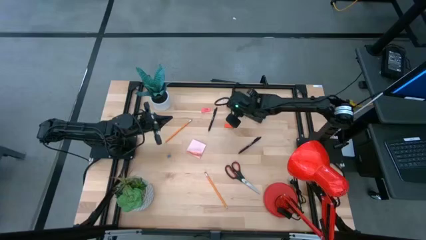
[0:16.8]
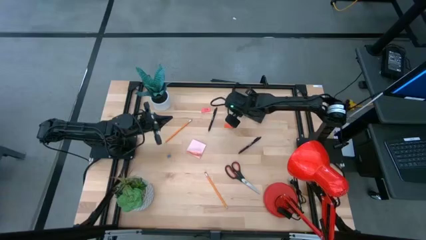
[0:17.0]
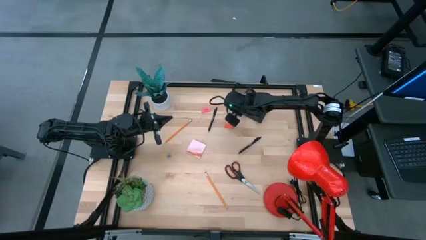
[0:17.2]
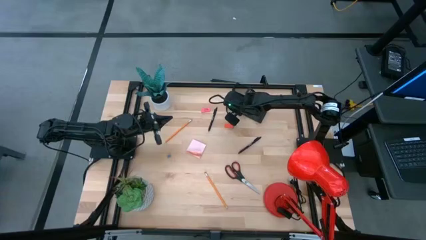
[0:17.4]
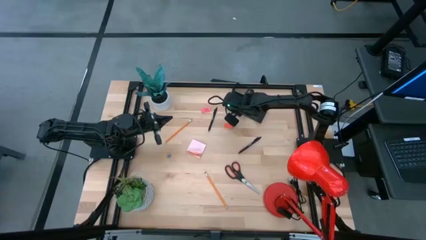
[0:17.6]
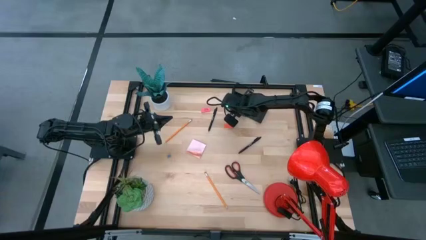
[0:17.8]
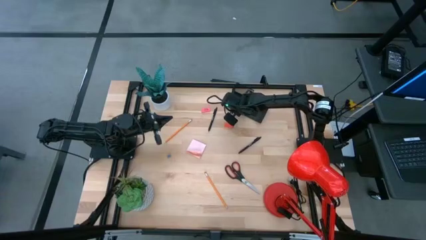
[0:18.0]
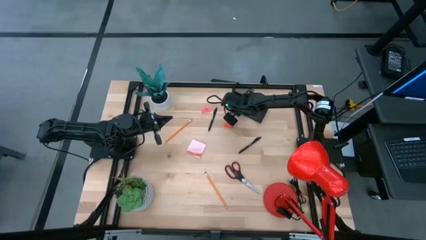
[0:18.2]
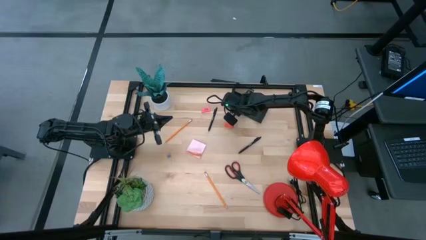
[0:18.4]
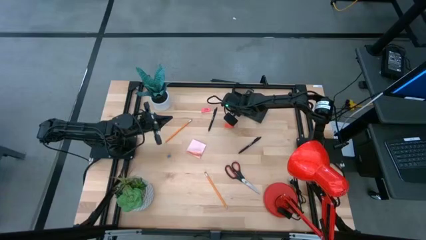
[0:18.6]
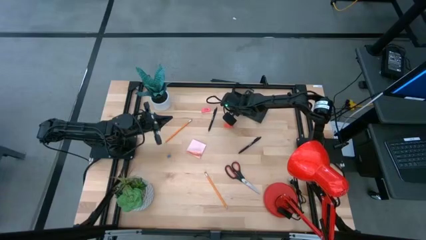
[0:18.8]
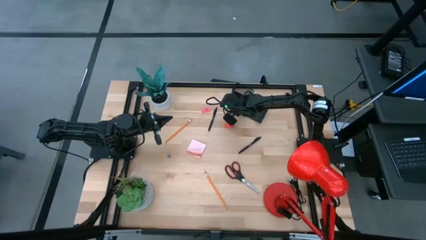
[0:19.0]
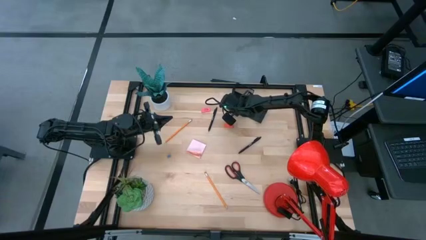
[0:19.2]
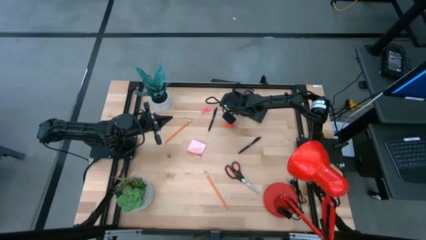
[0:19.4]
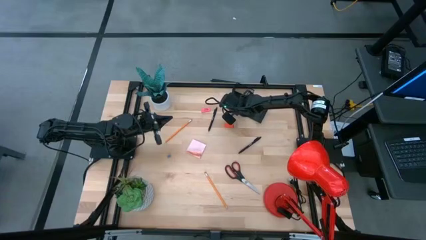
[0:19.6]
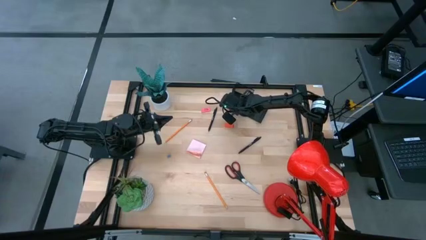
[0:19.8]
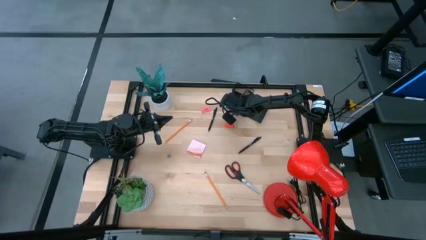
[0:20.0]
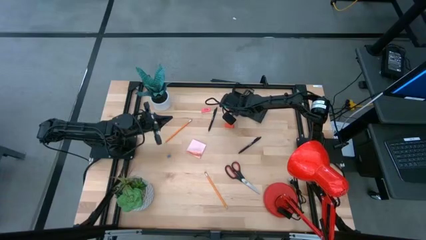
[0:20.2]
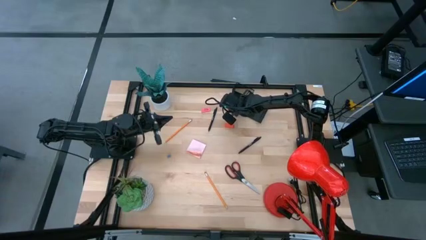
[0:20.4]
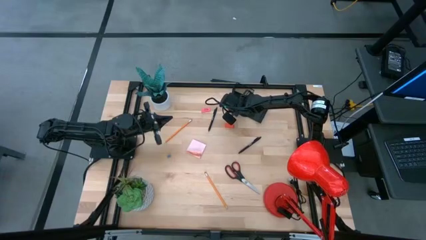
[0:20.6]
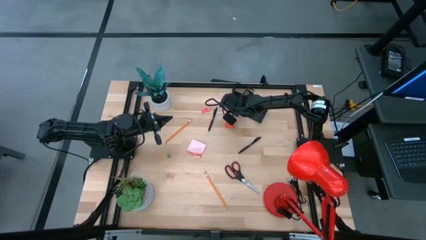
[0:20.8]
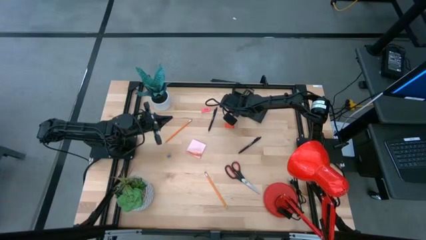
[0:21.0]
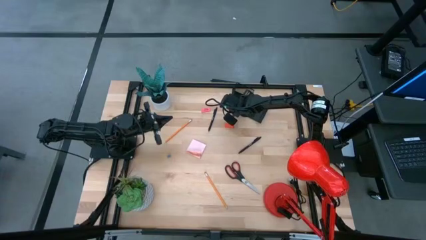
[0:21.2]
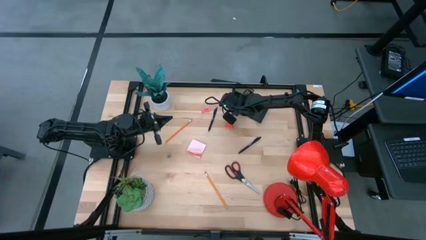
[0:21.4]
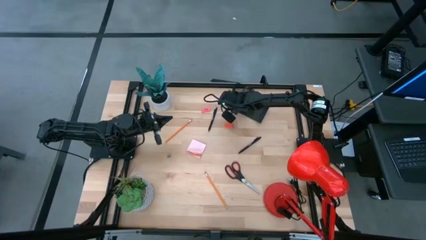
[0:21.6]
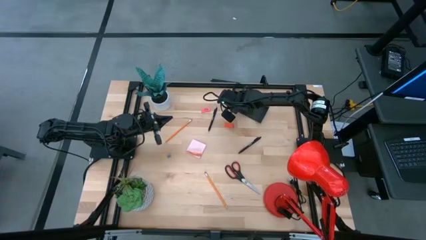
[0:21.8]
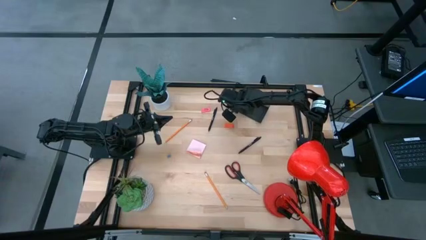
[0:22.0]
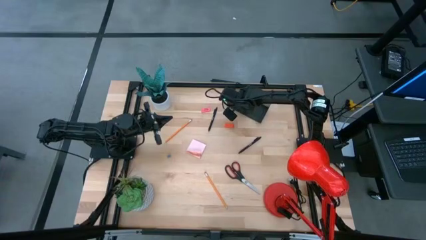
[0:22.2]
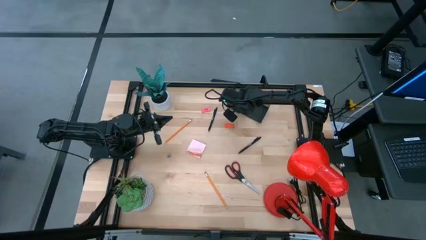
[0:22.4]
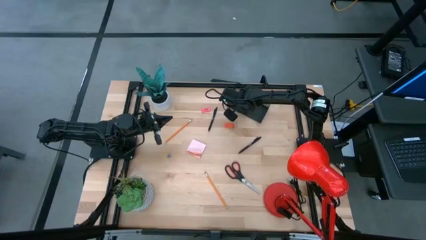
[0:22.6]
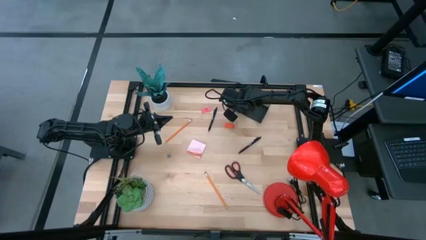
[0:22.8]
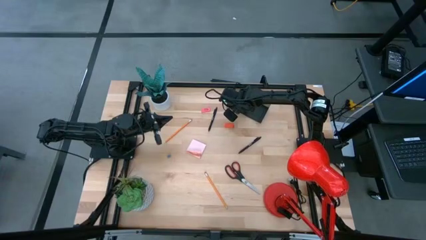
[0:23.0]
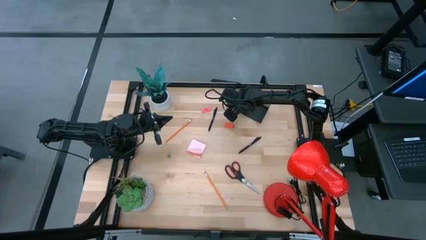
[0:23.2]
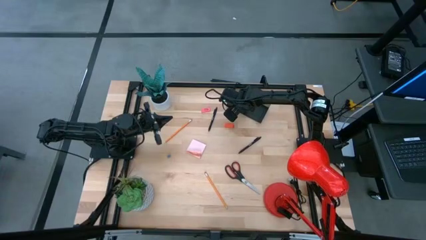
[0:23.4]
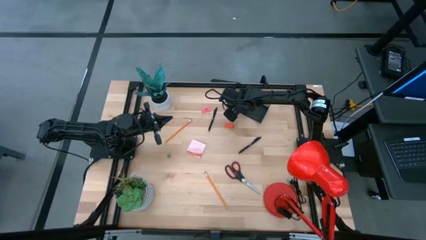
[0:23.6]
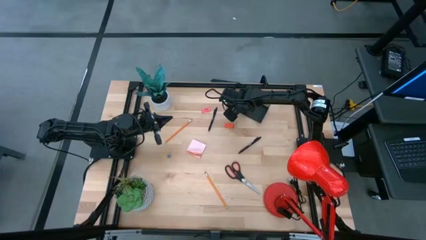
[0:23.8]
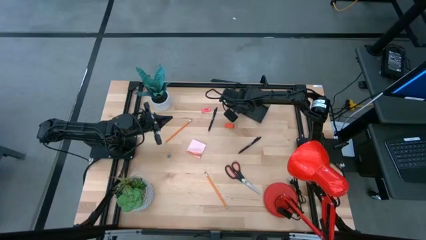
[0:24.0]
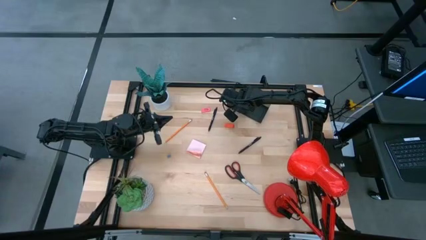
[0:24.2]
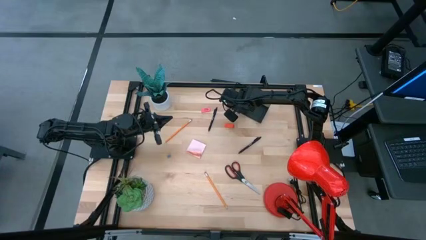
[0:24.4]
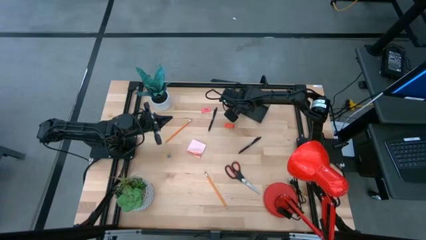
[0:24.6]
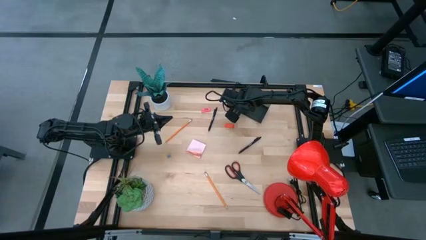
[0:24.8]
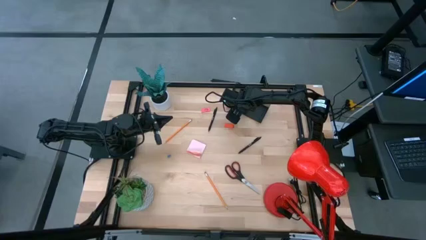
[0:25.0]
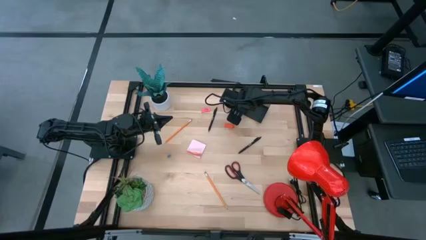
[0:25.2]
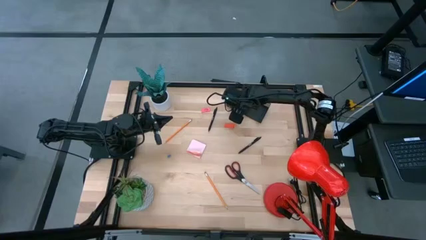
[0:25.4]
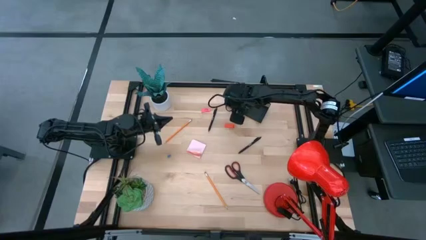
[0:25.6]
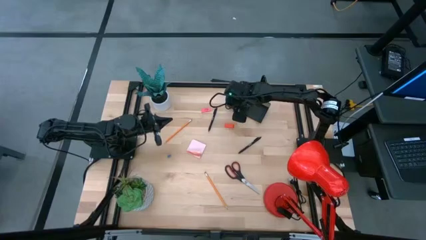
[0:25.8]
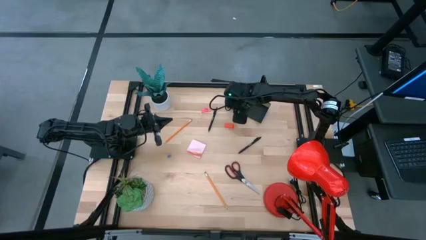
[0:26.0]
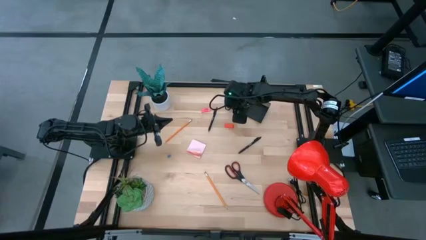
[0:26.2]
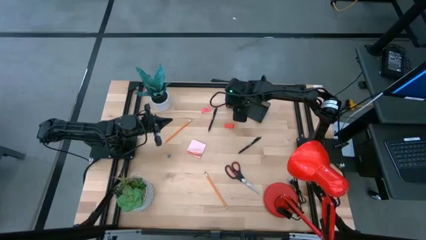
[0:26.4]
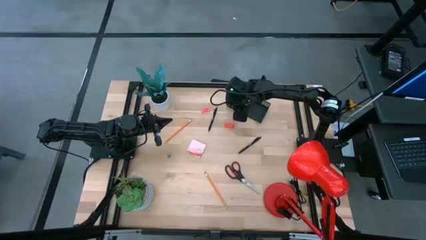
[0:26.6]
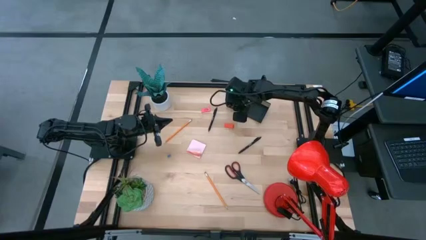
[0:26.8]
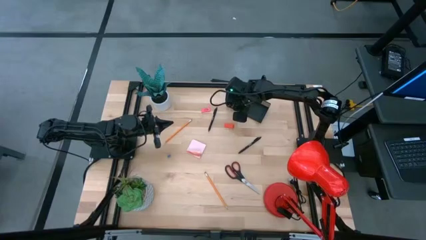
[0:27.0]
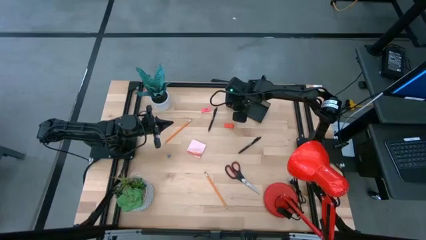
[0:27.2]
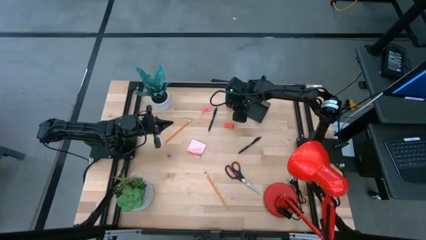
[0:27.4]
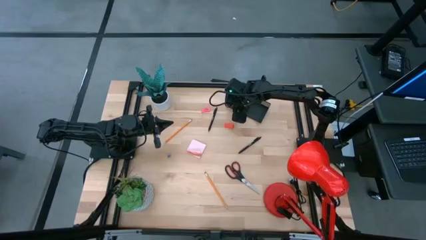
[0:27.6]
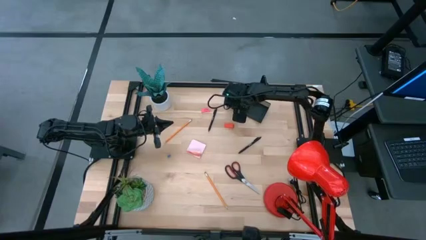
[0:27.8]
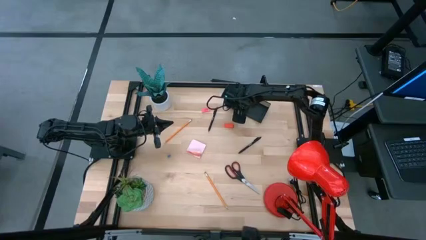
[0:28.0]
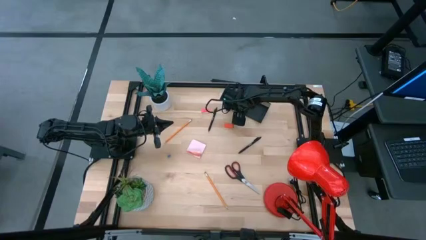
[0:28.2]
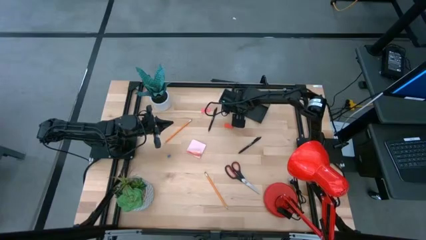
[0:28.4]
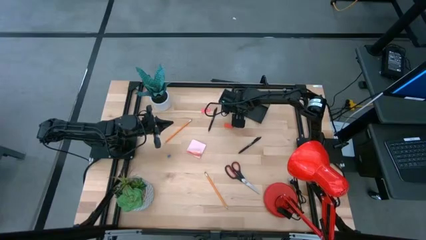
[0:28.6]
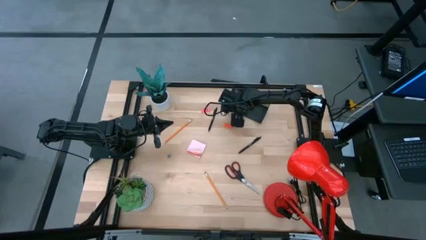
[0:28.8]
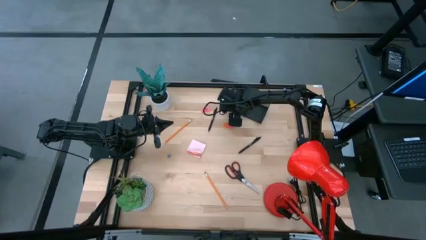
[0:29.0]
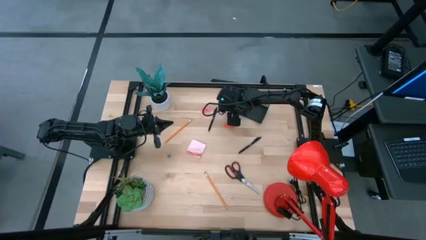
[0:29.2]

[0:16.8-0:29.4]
Task: Pick and place office supplies into organizer
Put the pink binder clip into the black desk organizer
